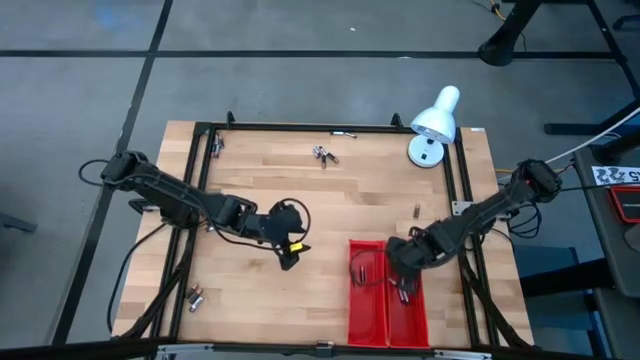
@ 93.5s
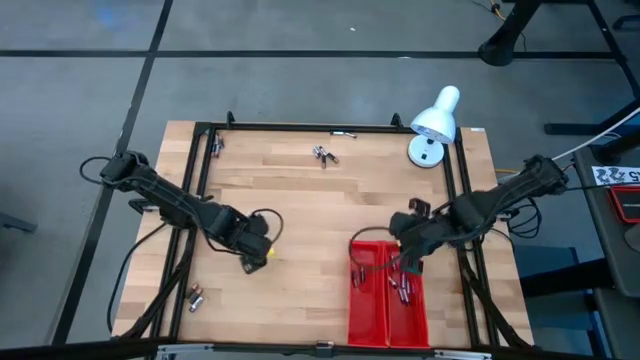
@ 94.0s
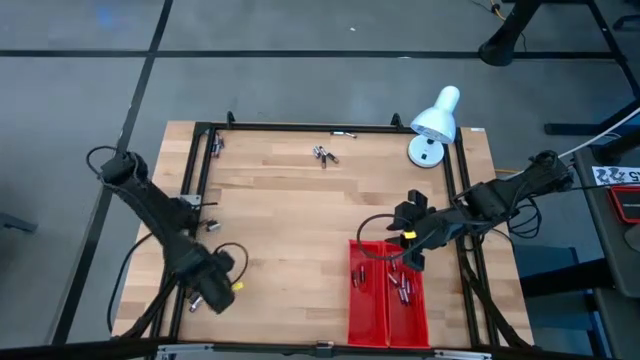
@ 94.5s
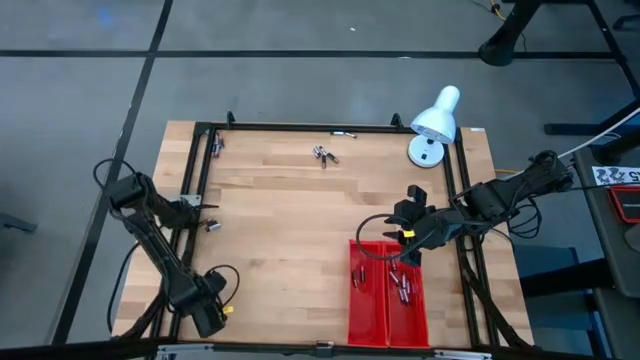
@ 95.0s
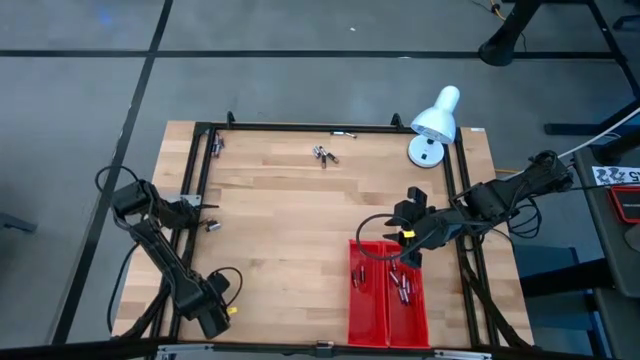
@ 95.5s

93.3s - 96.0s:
Task: Sort batteries
Put the silver battery into the right red bin

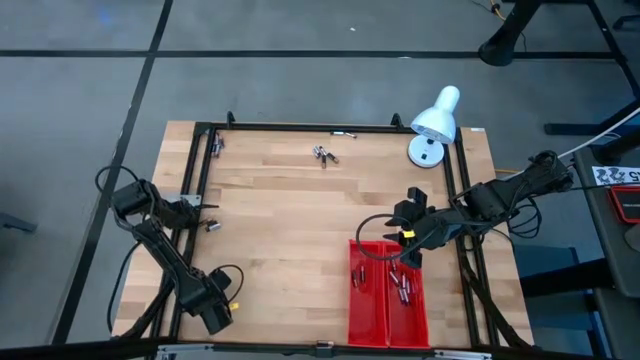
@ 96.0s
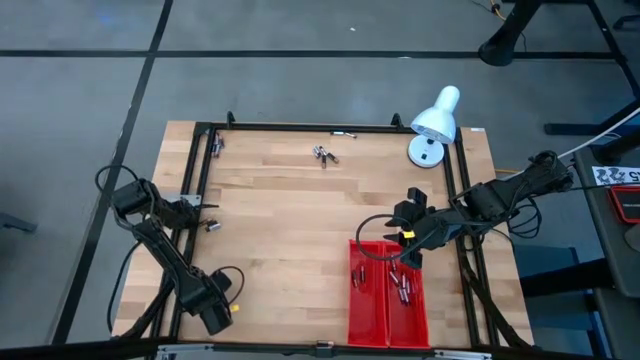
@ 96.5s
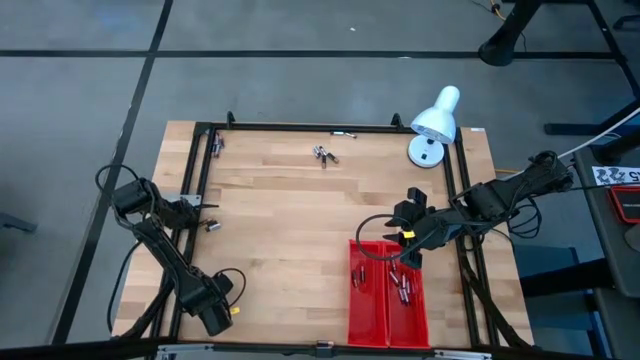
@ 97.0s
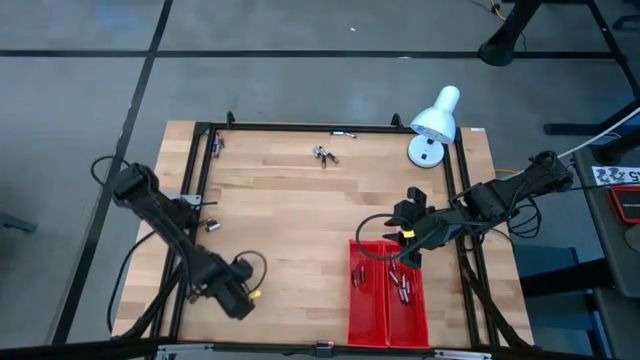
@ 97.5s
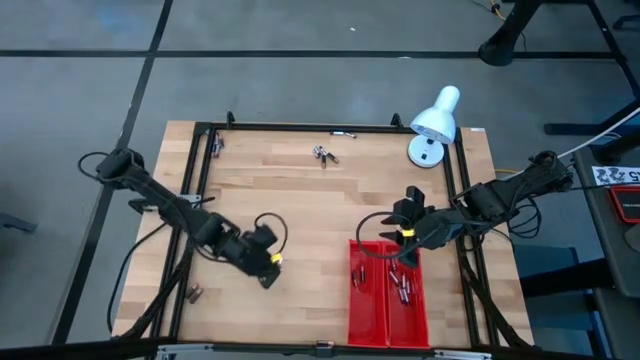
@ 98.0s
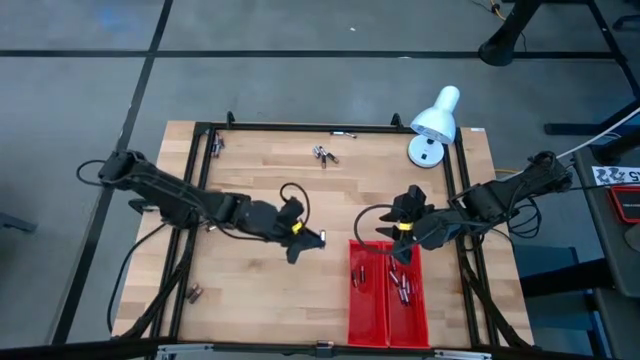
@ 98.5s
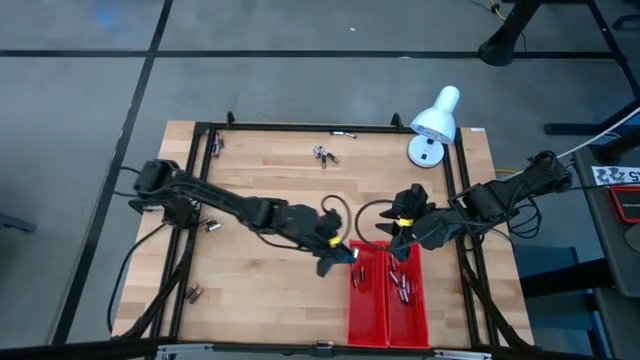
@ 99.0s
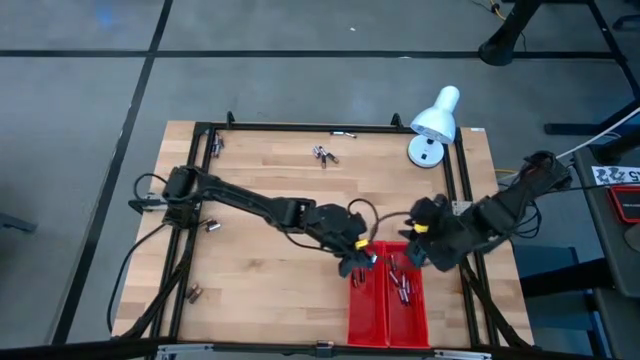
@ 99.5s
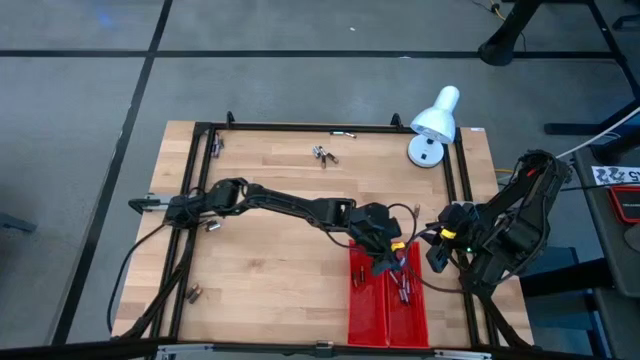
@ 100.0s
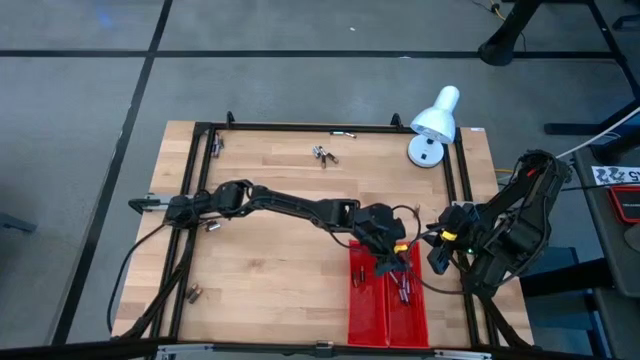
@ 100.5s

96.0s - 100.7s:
Put the silver battery into the right red bin

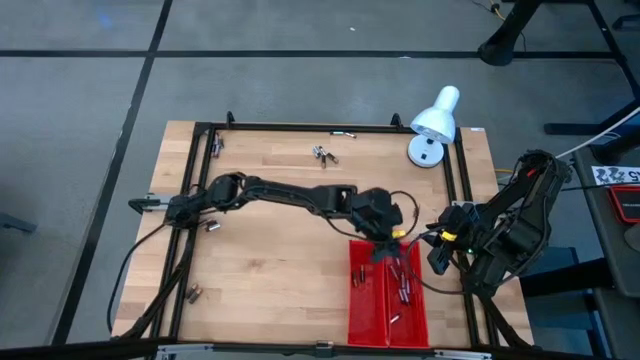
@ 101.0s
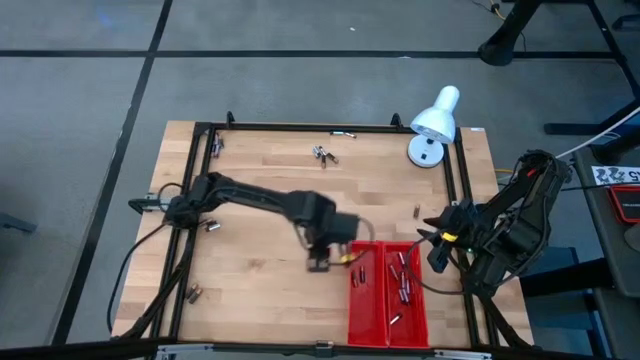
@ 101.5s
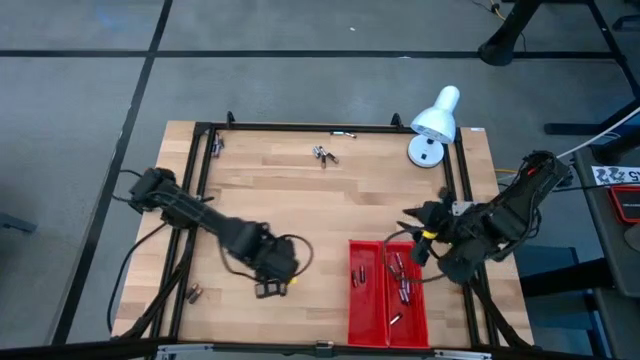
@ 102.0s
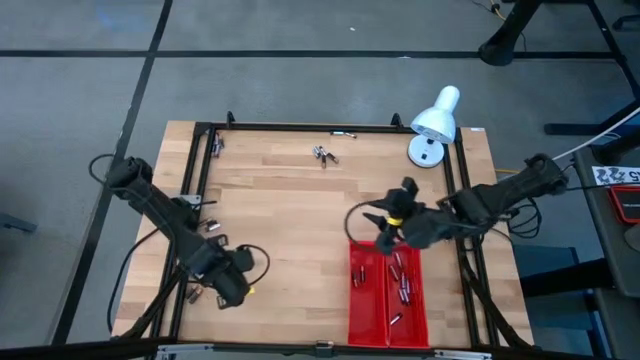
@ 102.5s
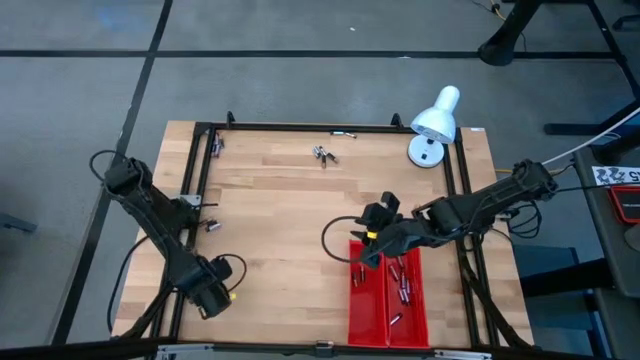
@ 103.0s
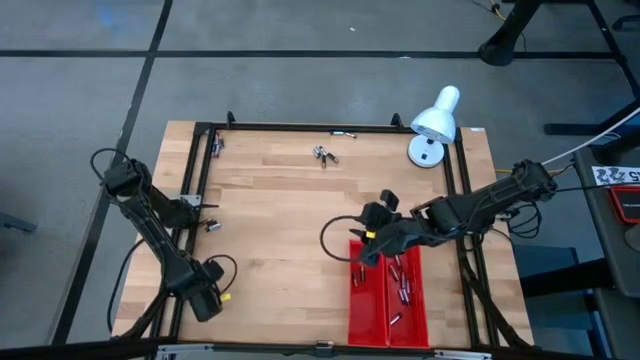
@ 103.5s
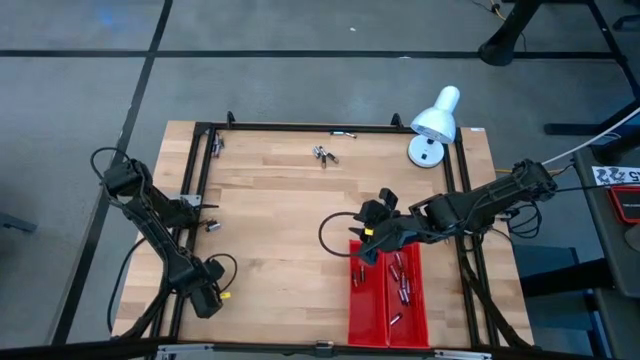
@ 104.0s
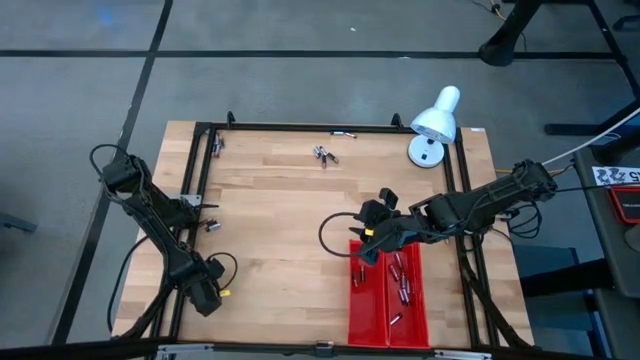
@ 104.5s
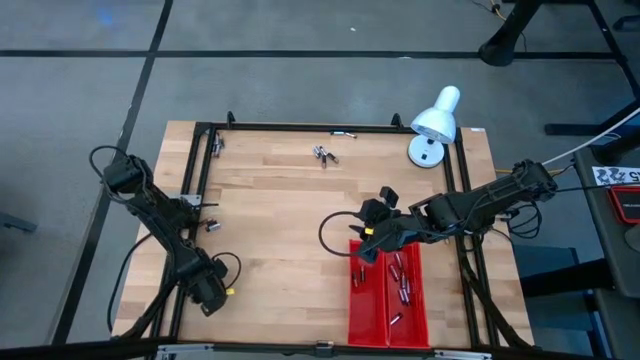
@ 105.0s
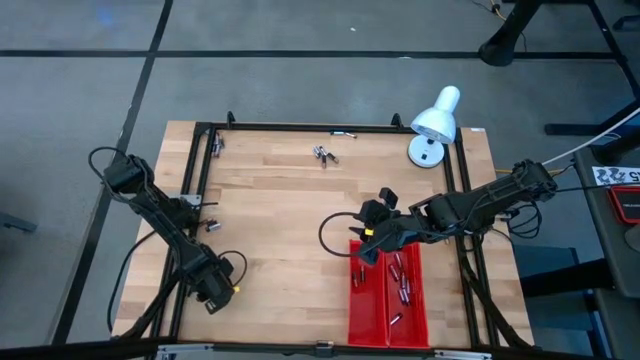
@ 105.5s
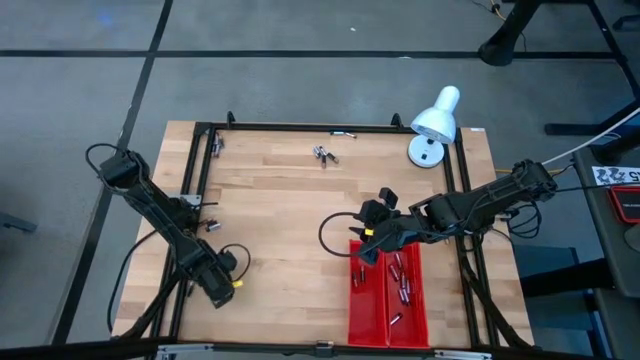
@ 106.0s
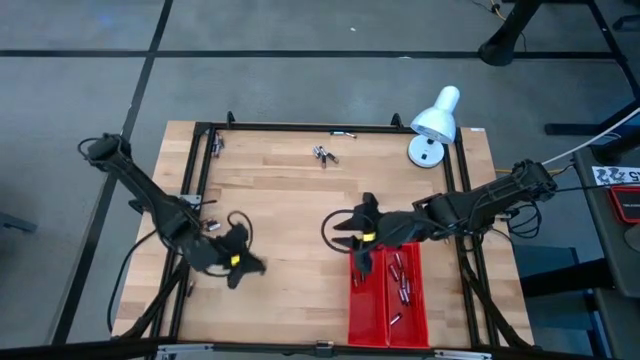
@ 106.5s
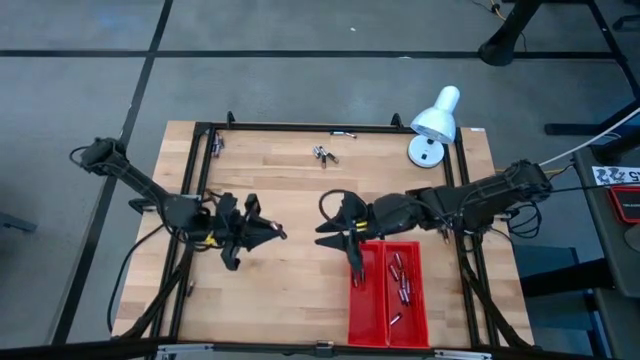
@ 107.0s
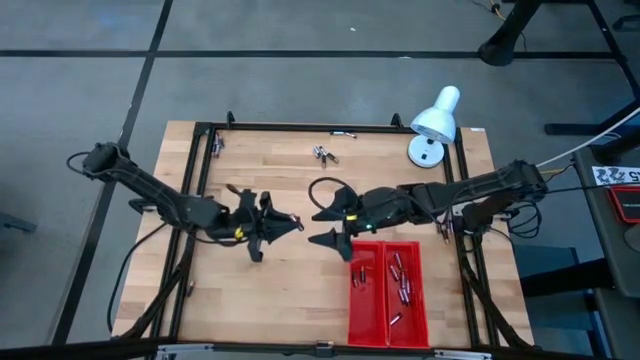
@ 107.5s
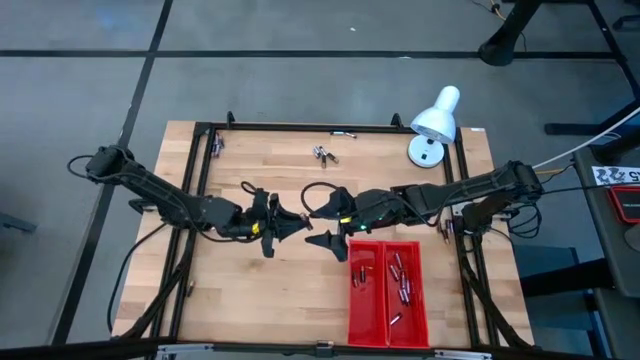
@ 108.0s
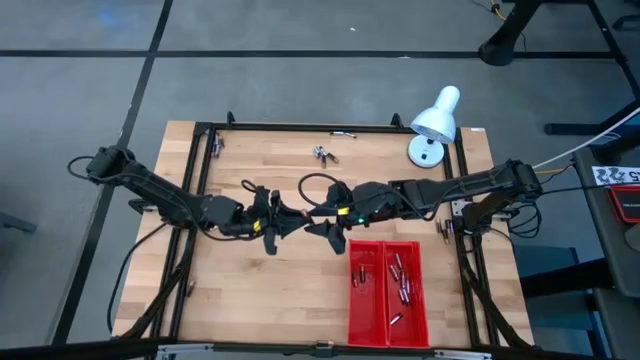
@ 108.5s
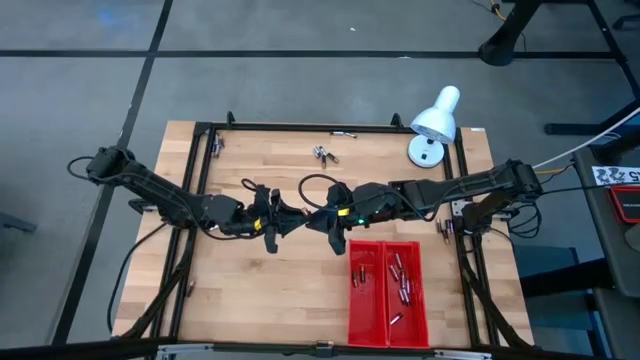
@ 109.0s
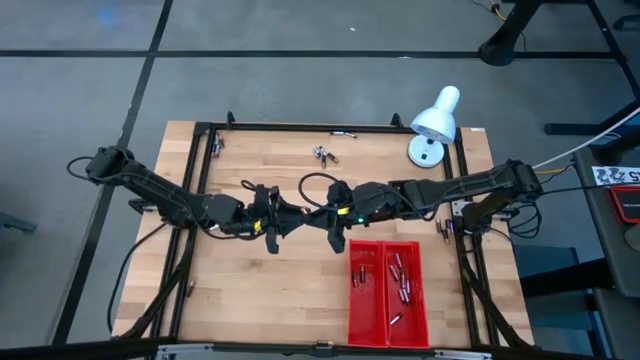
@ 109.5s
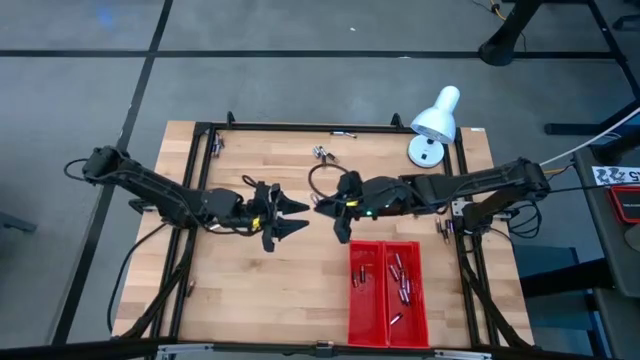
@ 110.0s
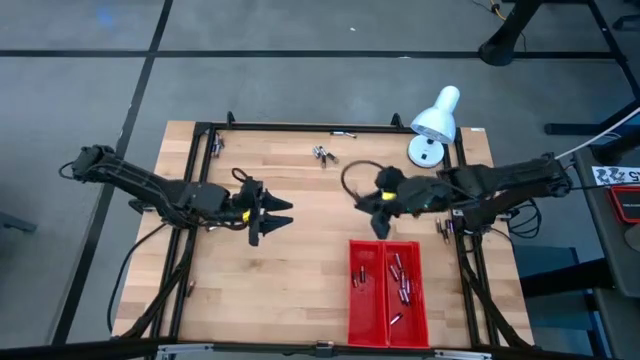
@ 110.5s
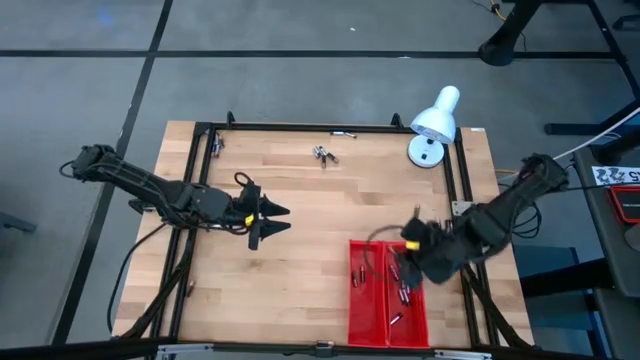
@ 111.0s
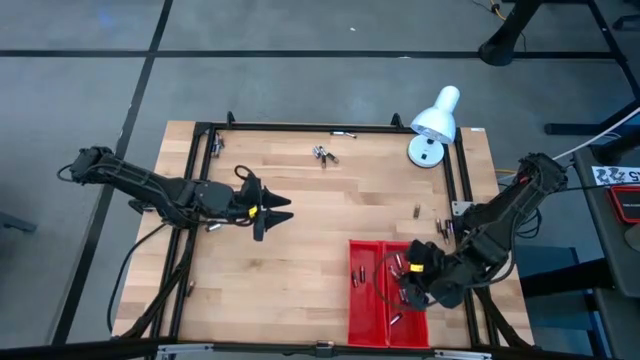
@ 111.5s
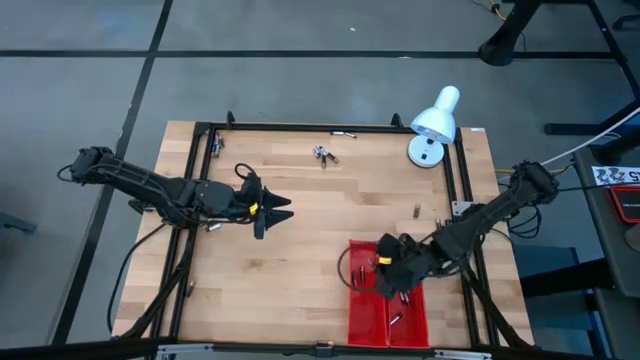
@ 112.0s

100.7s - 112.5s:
Put the black battery into the left red bin

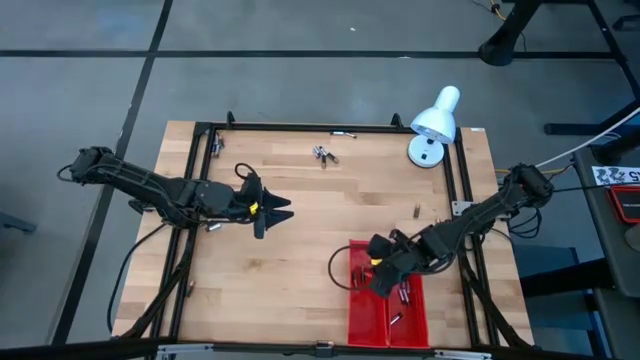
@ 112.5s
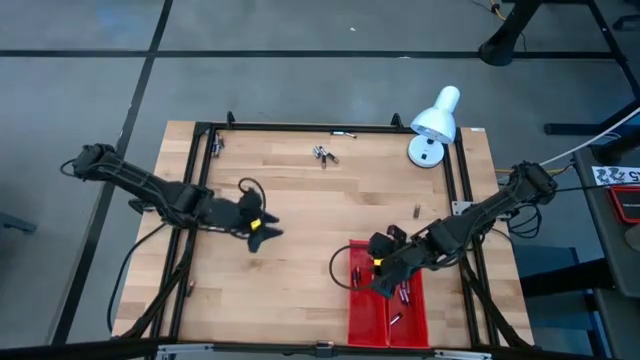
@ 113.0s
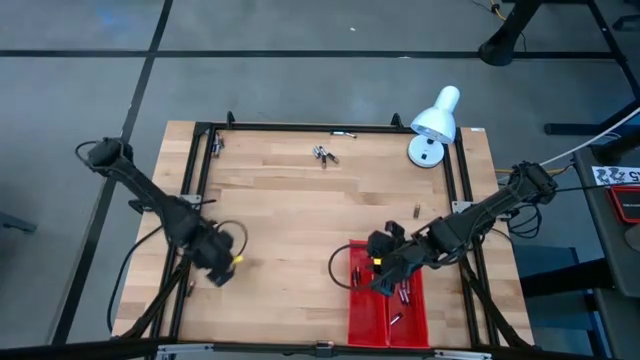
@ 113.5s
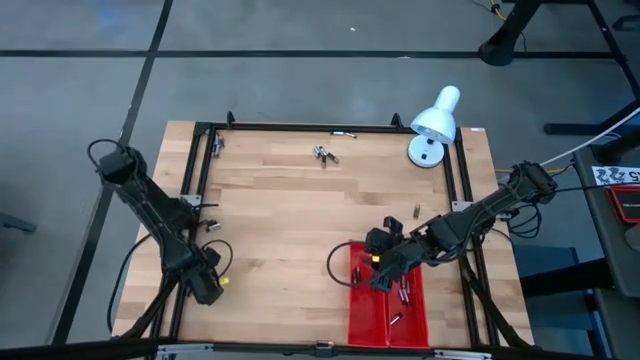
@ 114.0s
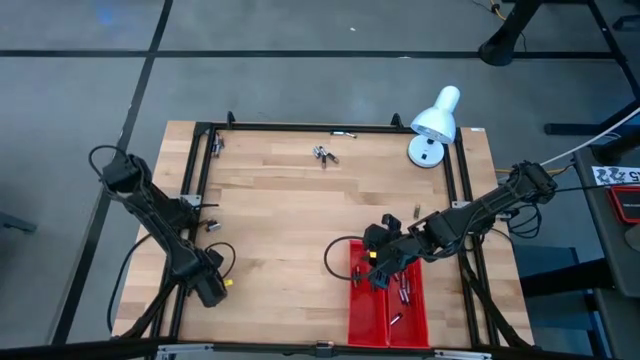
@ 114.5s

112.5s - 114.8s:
Put the black battery into the left red bin
